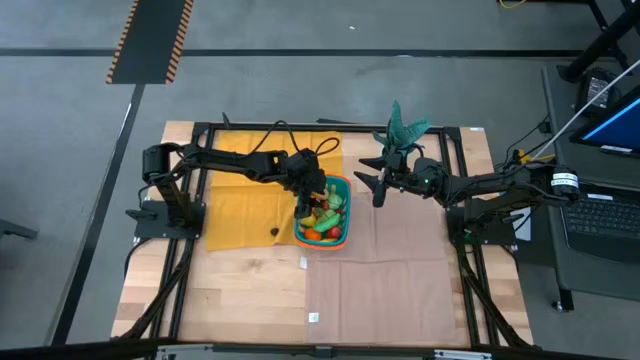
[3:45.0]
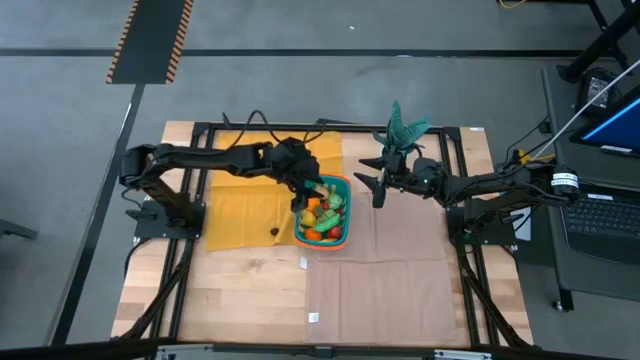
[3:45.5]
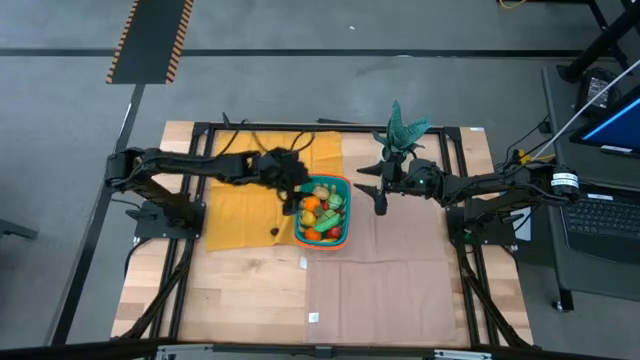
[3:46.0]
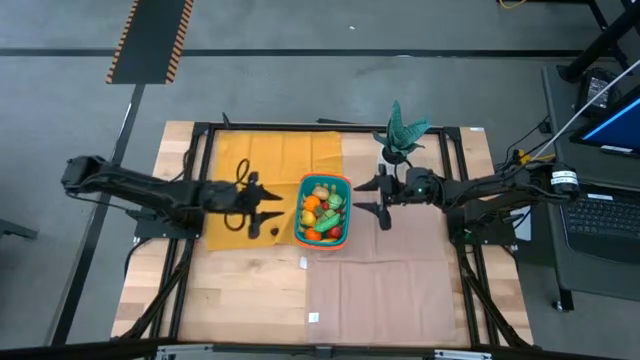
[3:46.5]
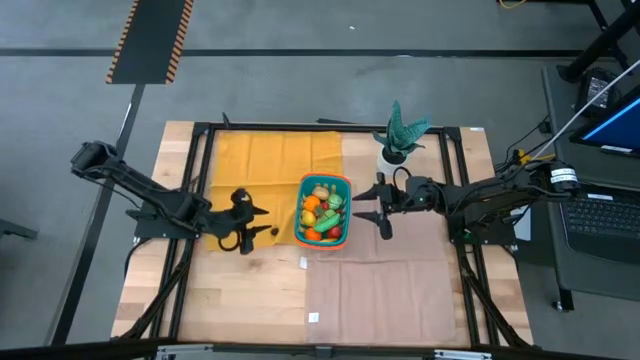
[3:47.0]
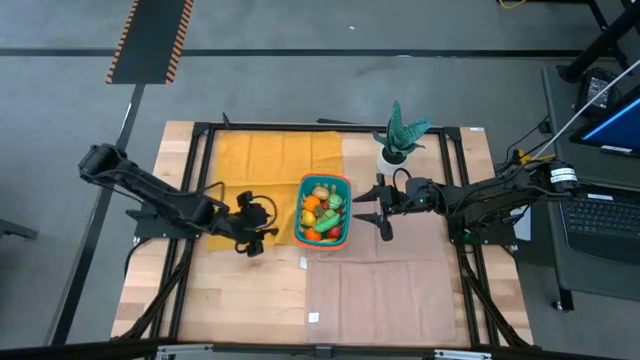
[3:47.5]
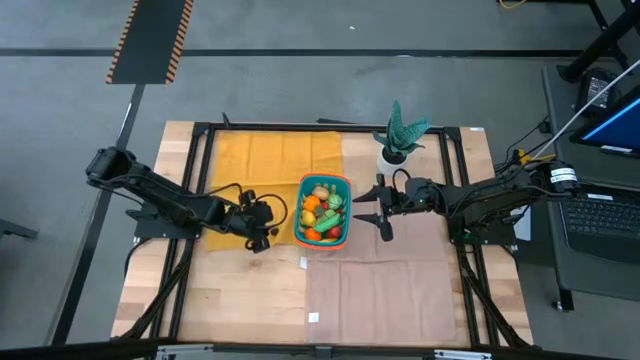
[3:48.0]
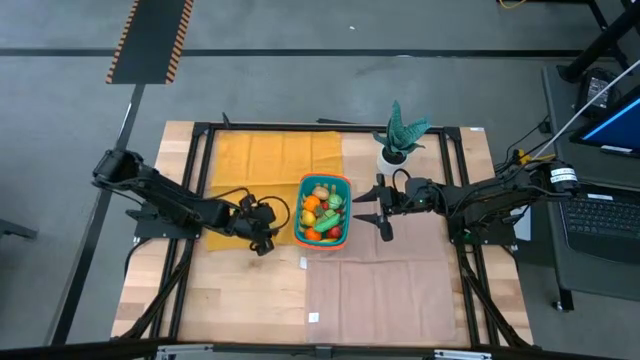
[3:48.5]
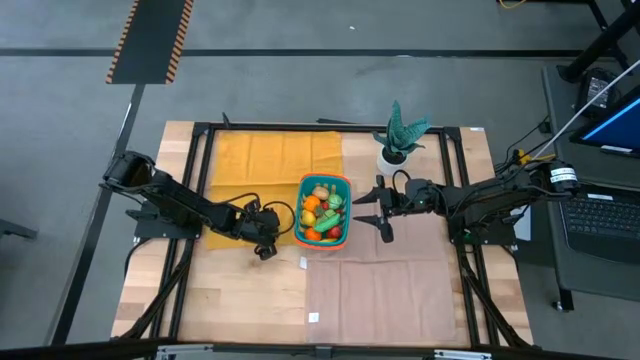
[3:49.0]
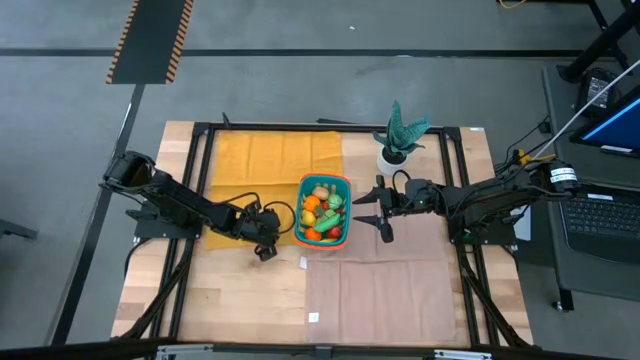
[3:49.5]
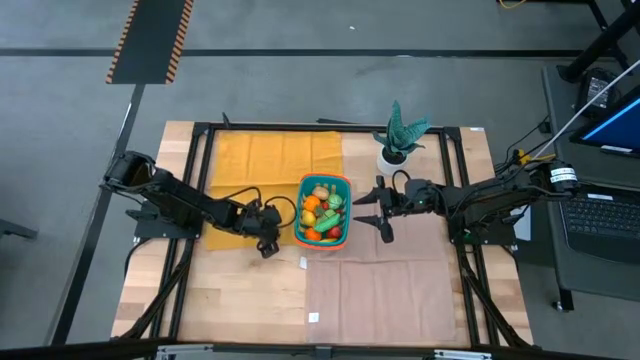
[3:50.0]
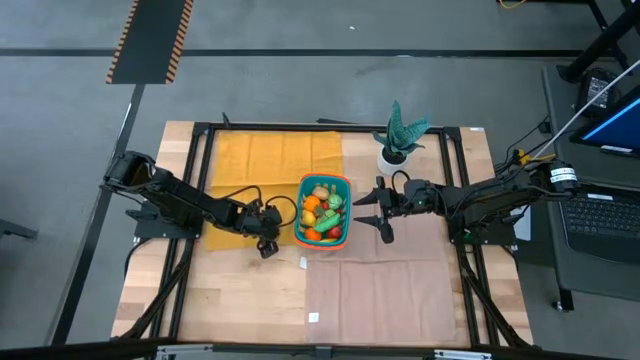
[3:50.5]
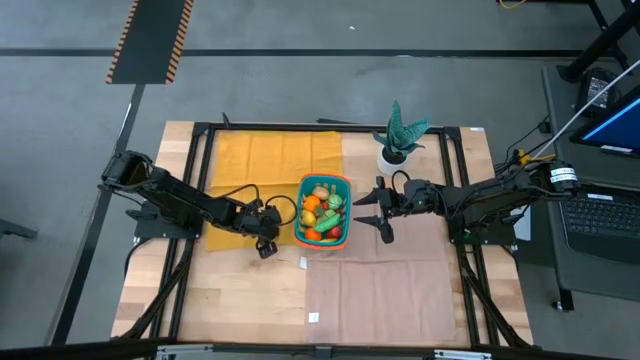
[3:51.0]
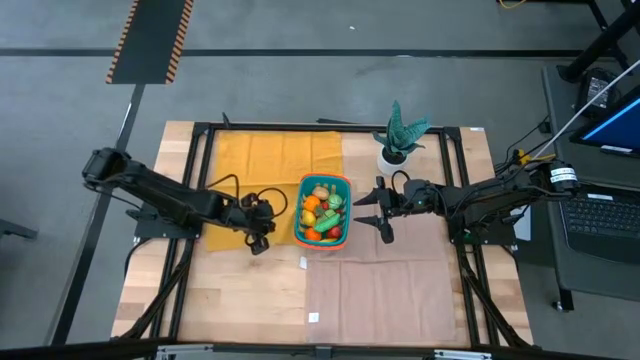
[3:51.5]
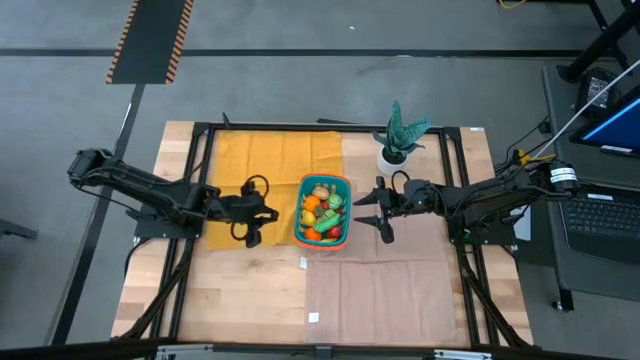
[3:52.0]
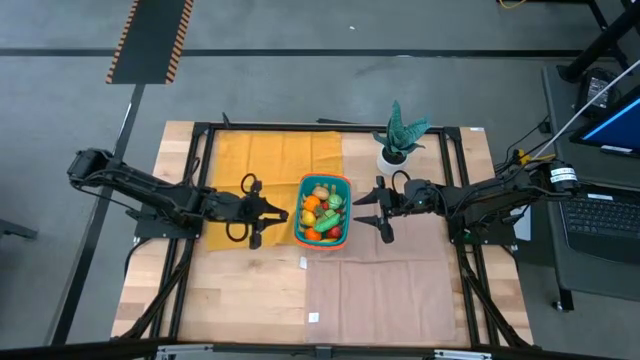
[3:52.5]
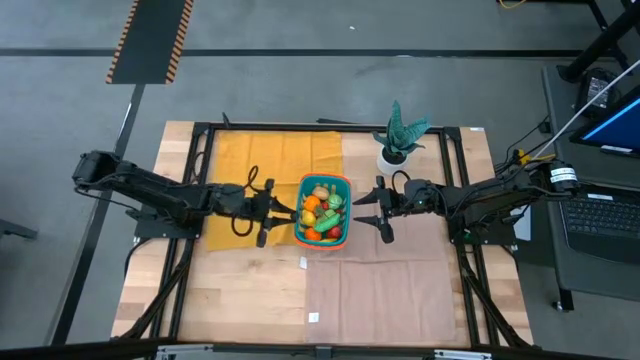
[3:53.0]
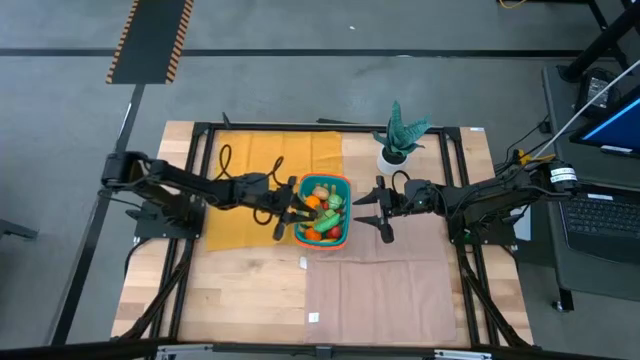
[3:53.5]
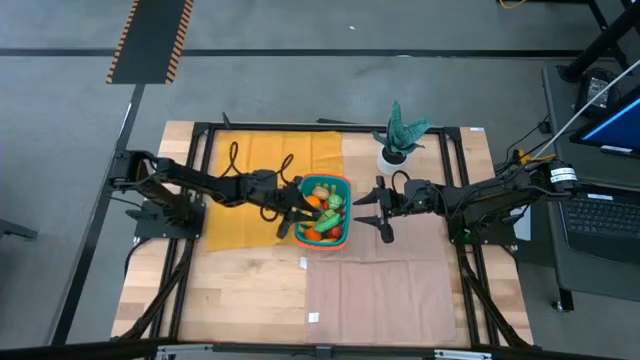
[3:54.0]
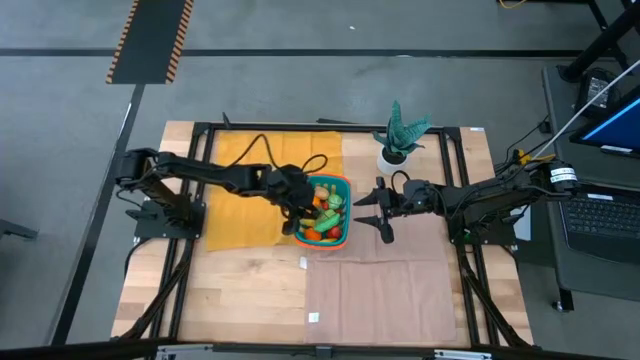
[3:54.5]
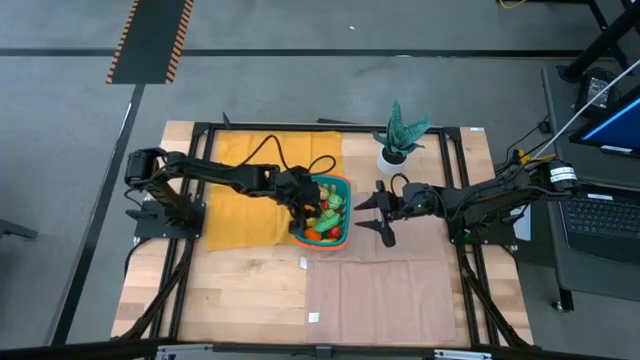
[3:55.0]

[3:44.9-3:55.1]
Task: Pick and placing Produce into tupperware
Put the blackberry into the basket

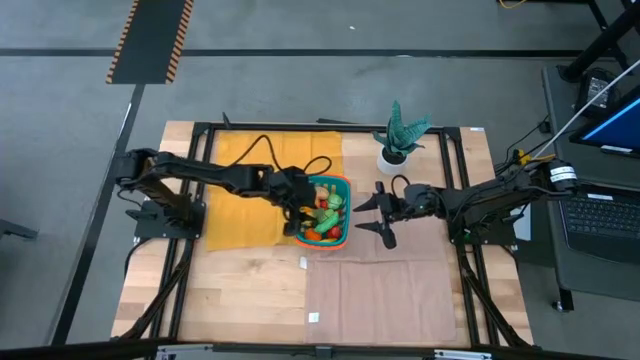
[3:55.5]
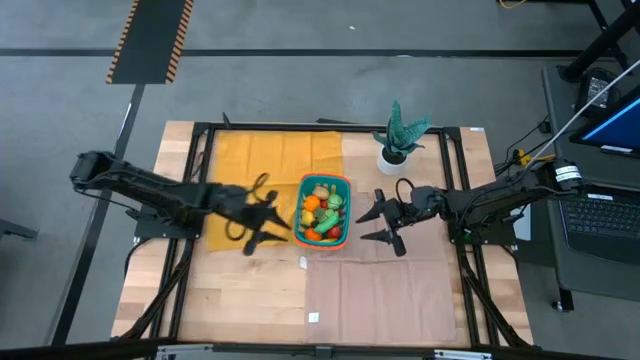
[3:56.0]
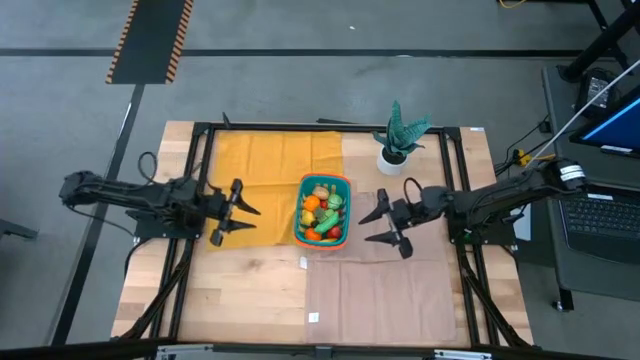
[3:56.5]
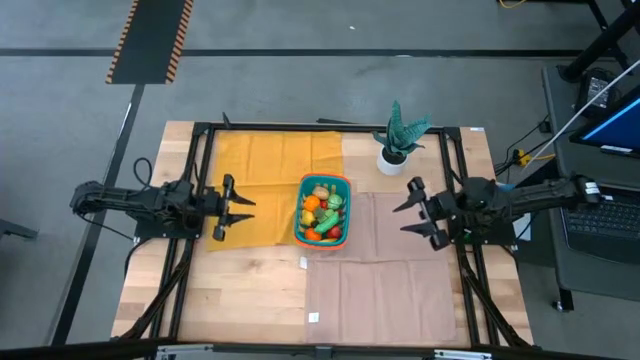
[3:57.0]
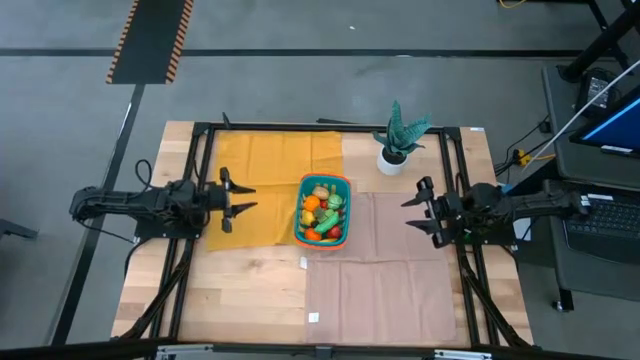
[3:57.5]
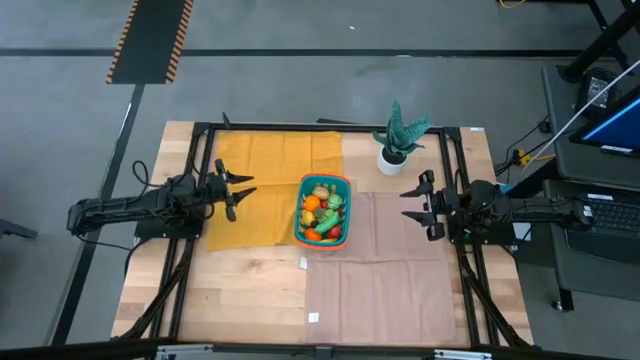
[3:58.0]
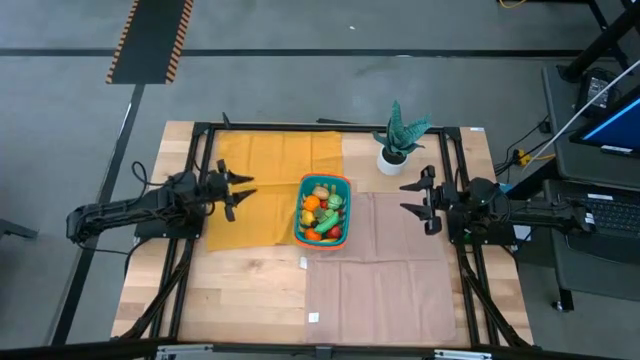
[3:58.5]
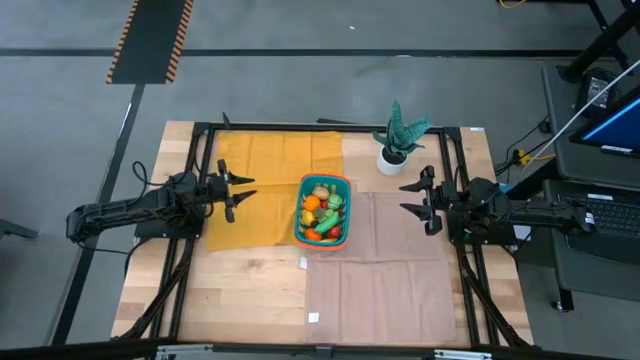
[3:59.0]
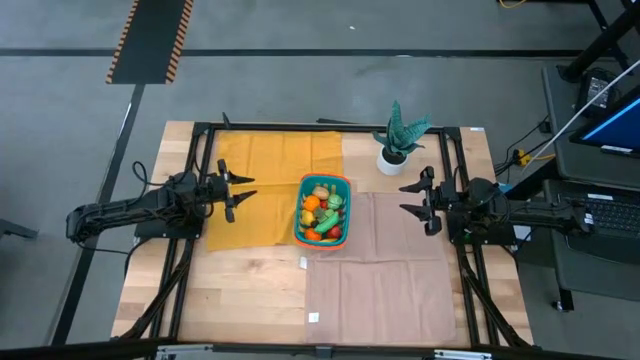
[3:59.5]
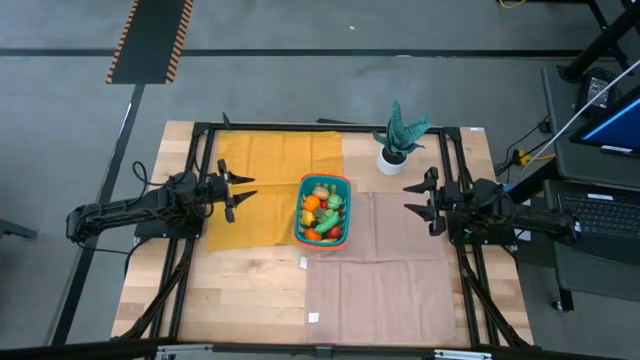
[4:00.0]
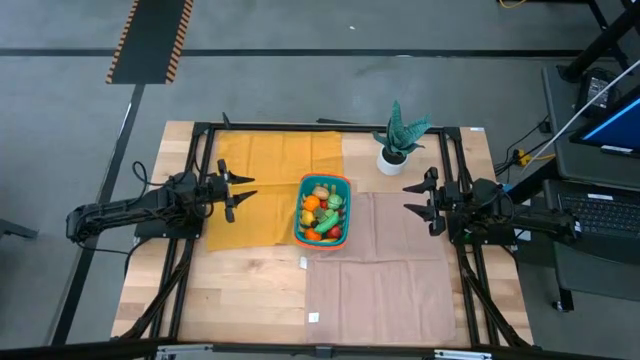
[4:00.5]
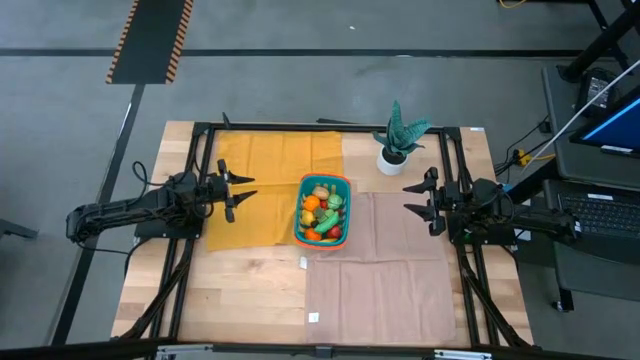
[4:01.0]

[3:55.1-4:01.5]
Return to Home Position

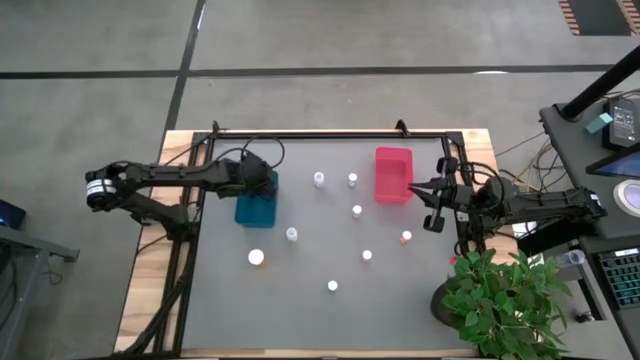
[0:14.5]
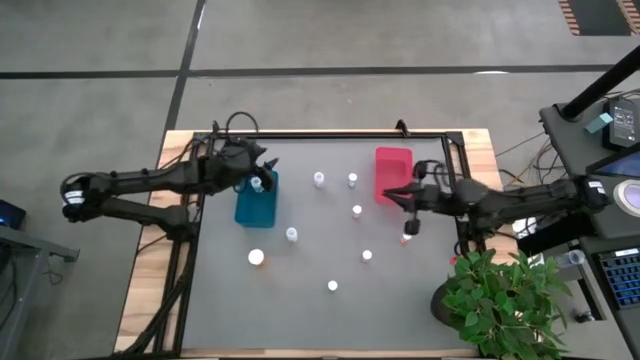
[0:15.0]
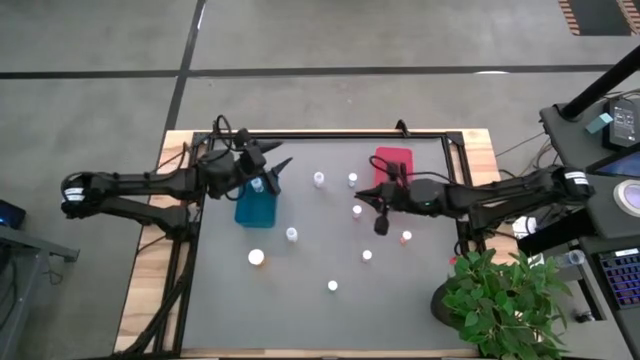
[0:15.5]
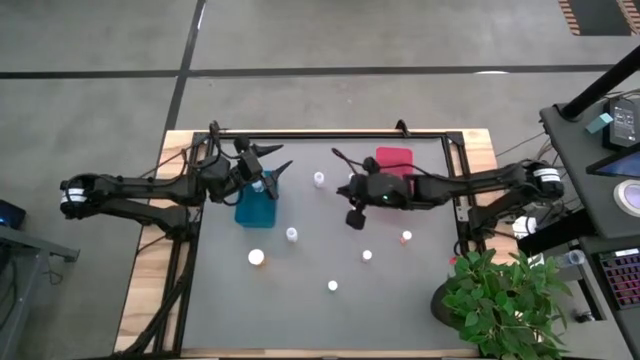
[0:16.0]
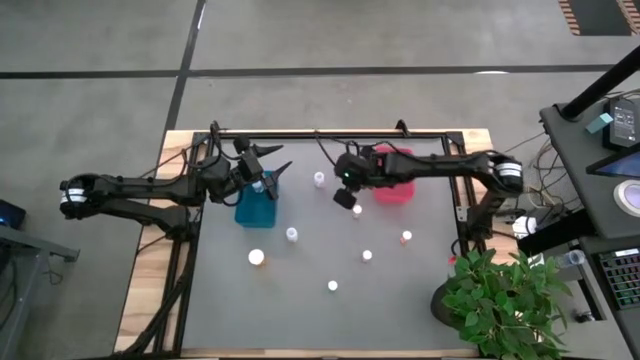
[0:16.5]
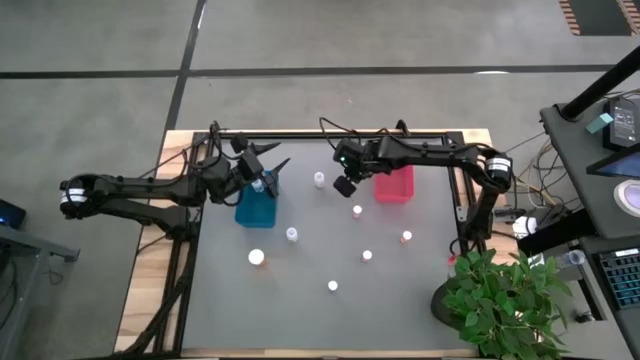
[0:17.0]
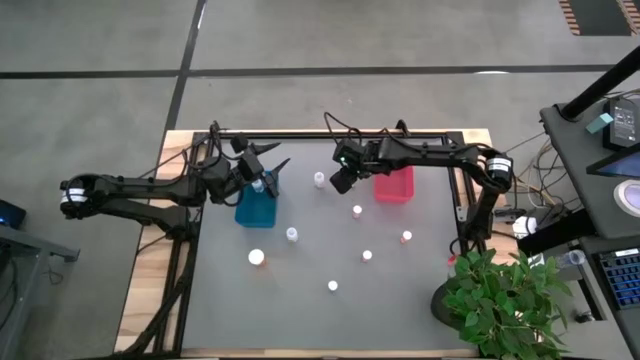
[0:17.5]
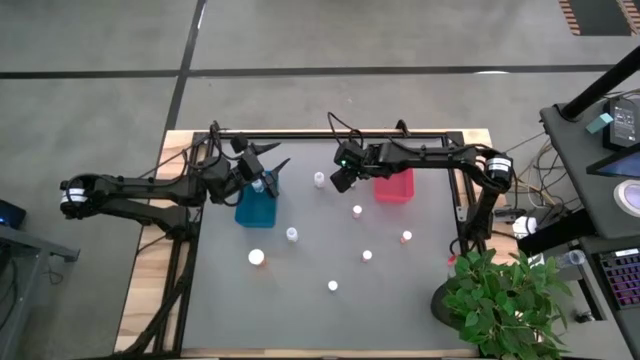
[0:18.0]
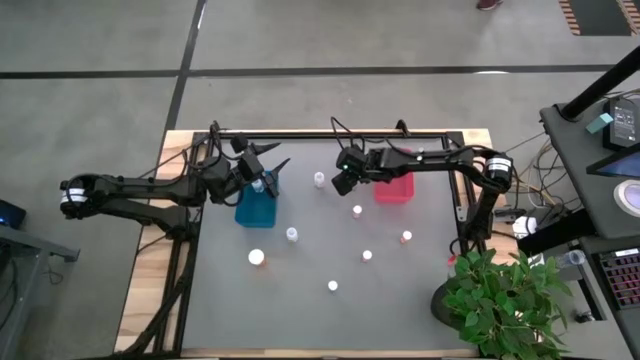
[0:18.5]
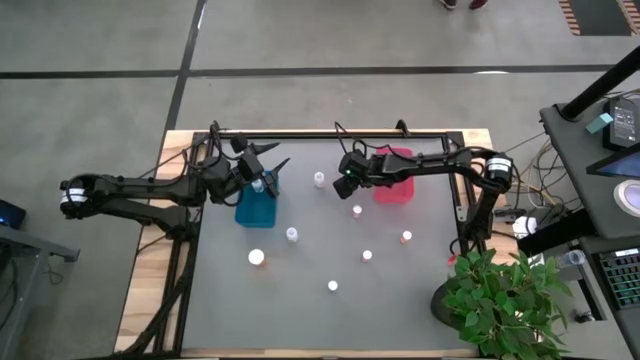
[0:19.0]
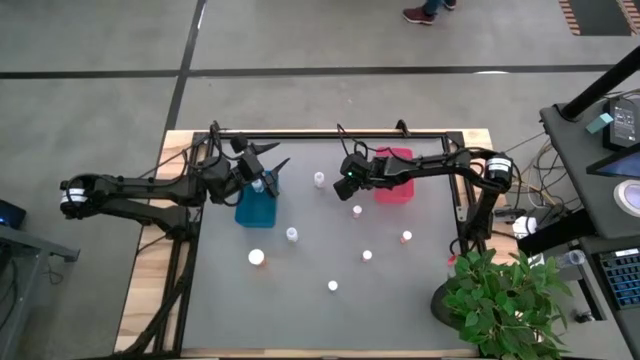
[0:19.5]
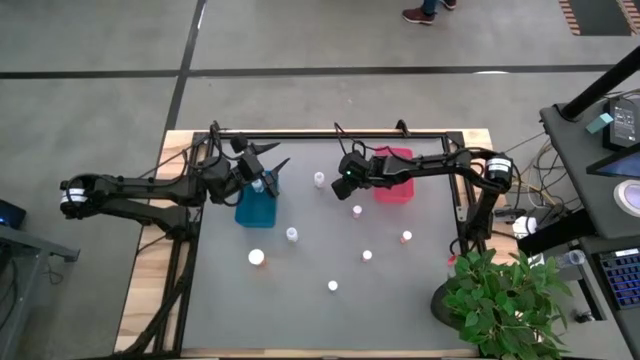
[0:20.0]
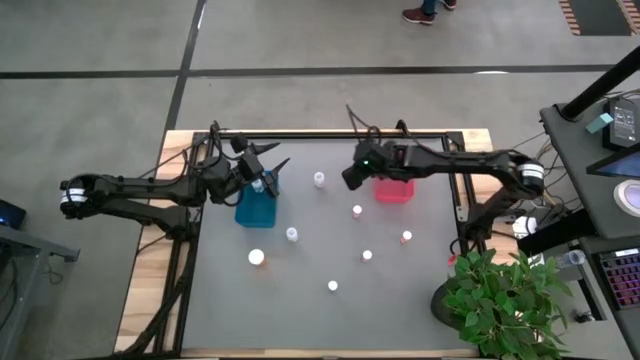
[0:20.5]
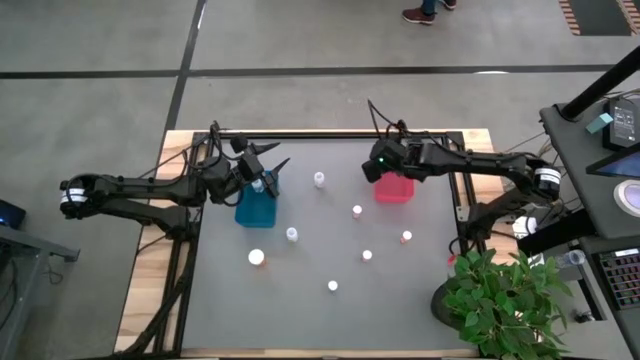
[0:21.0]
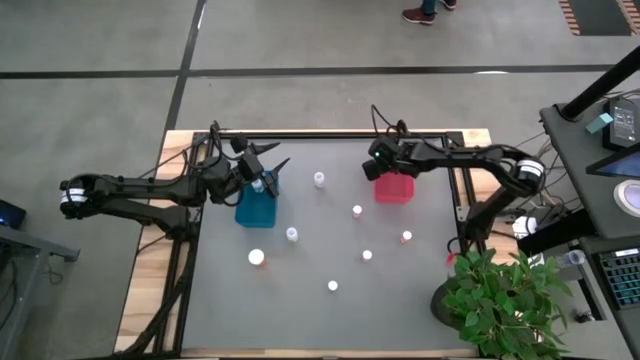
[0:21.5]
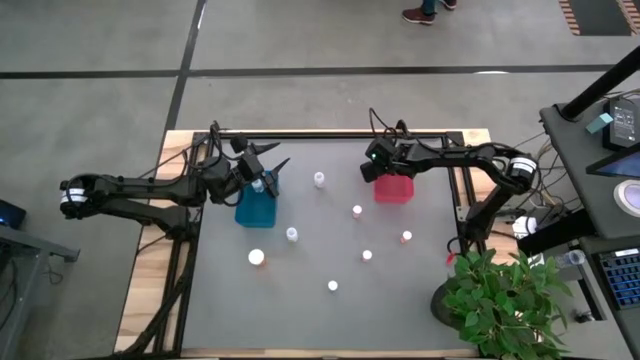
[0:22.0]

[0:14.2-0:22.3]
Task: Pick and place medicine bottles into bin by pill shape (circle, oval)
Put the top blue tablet bottle into the red bin
